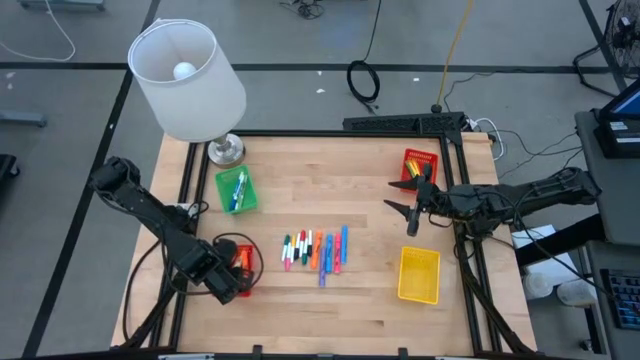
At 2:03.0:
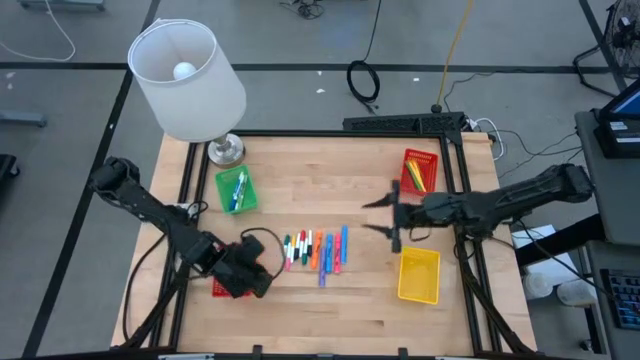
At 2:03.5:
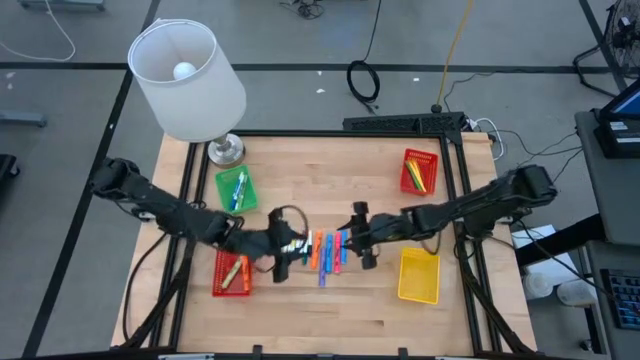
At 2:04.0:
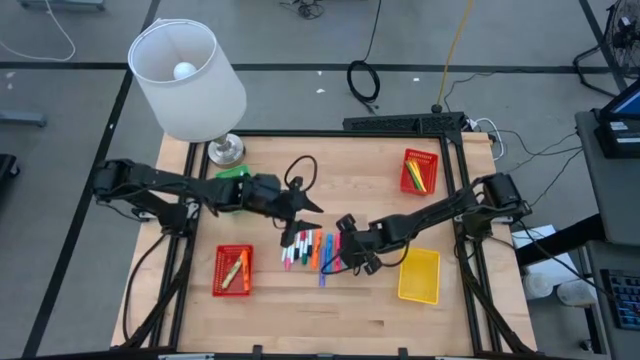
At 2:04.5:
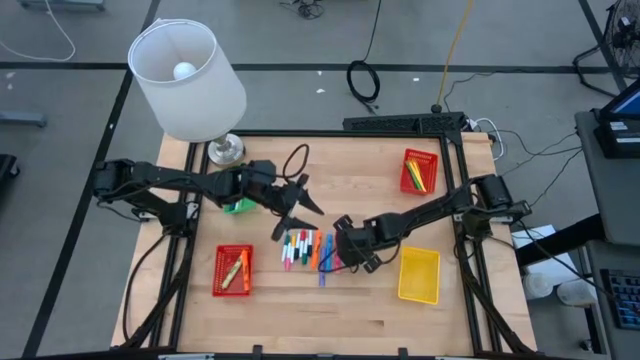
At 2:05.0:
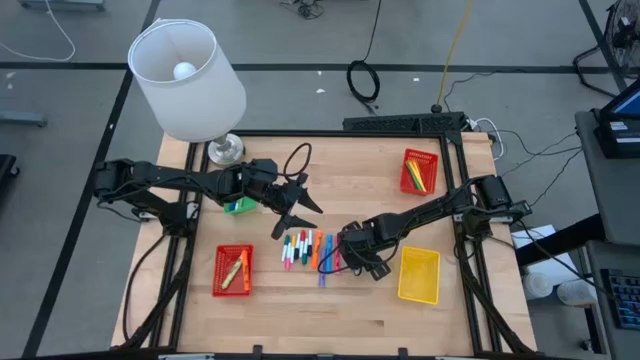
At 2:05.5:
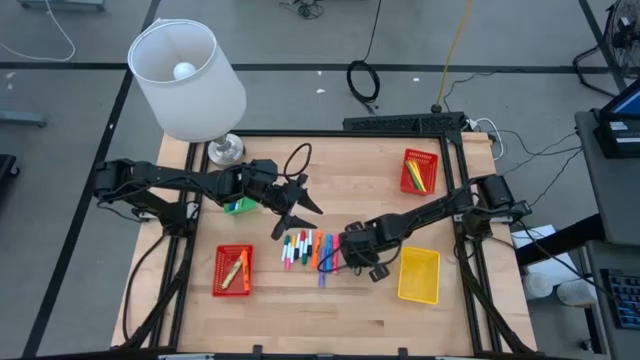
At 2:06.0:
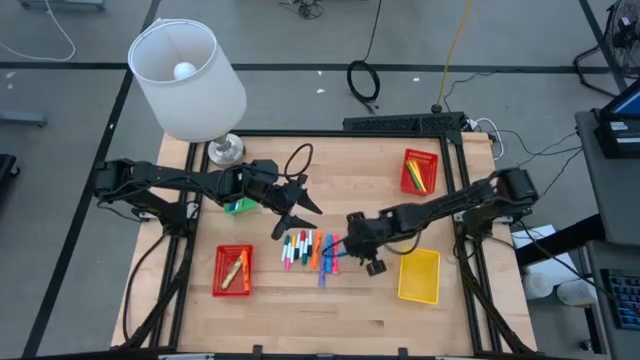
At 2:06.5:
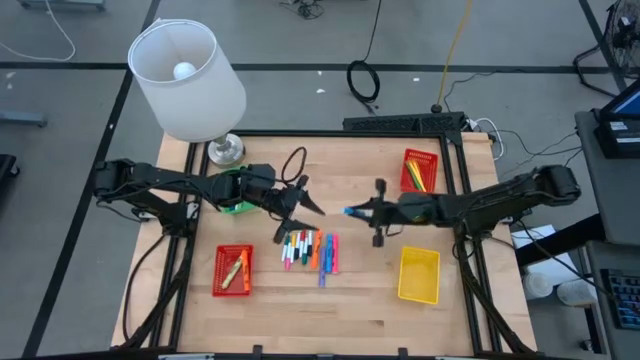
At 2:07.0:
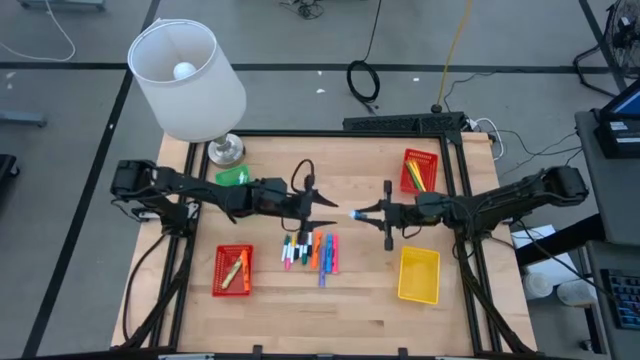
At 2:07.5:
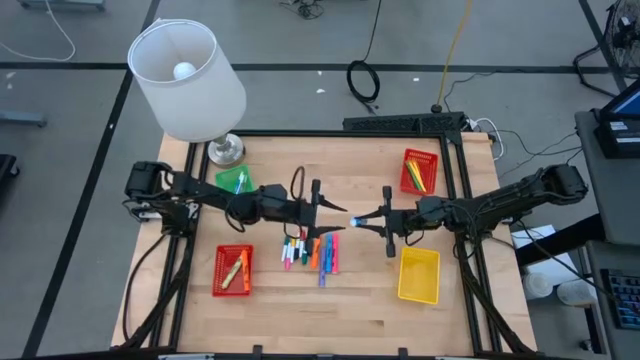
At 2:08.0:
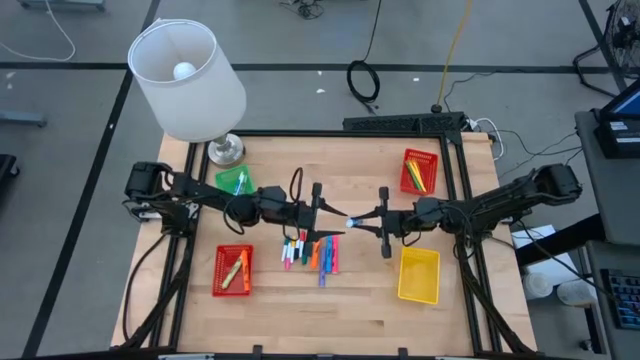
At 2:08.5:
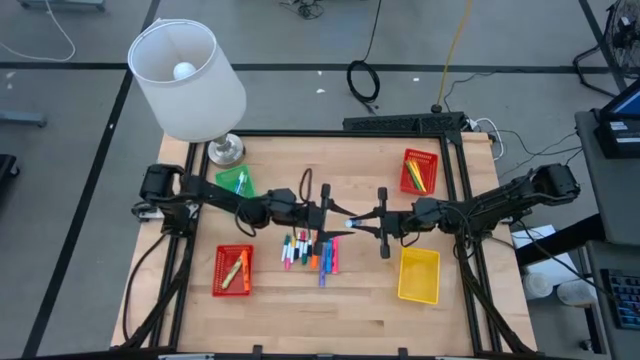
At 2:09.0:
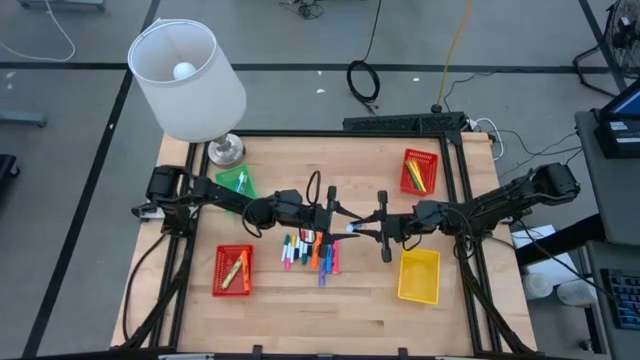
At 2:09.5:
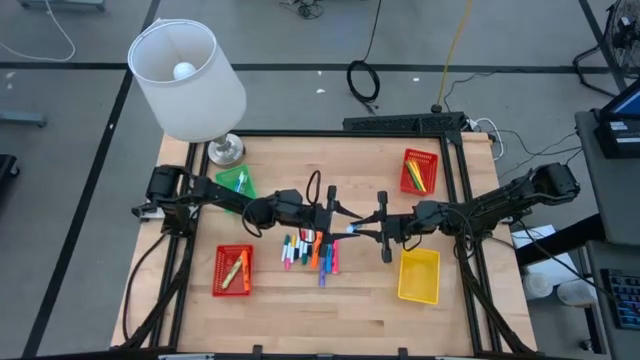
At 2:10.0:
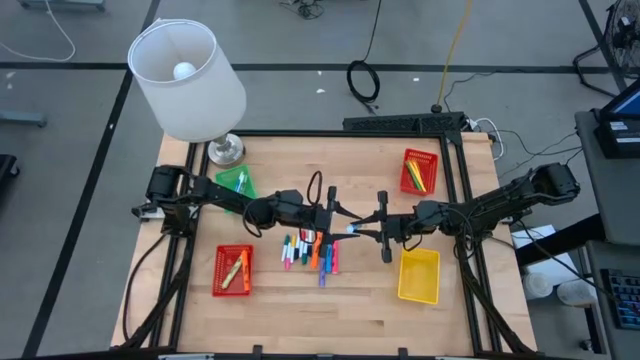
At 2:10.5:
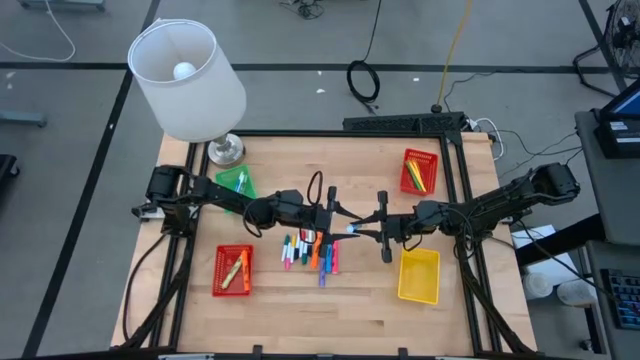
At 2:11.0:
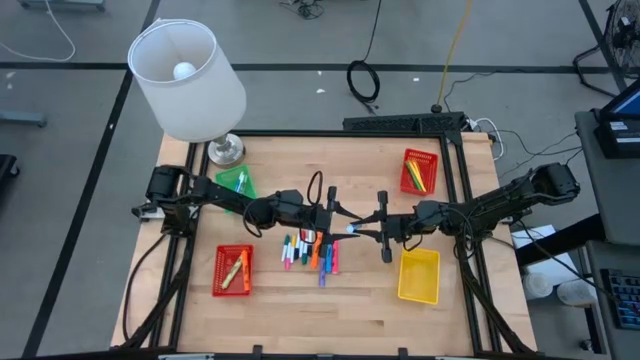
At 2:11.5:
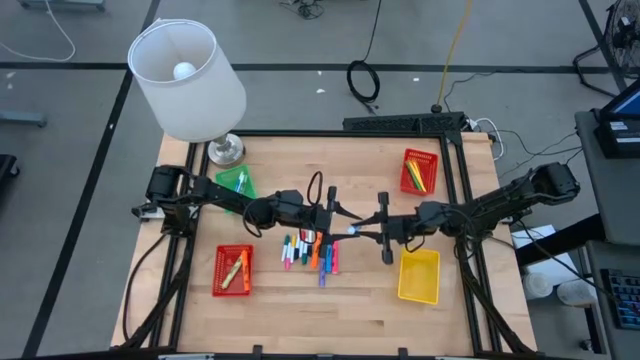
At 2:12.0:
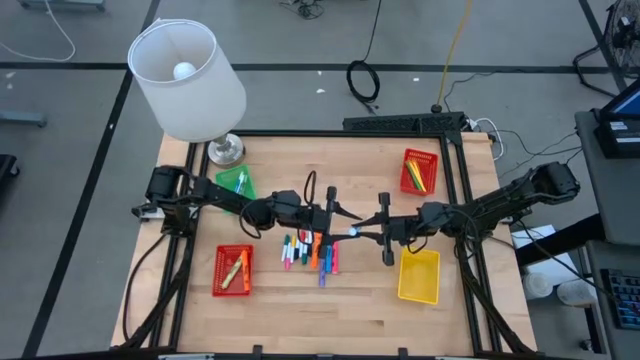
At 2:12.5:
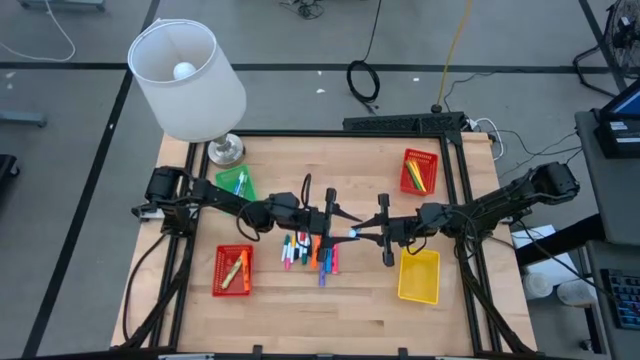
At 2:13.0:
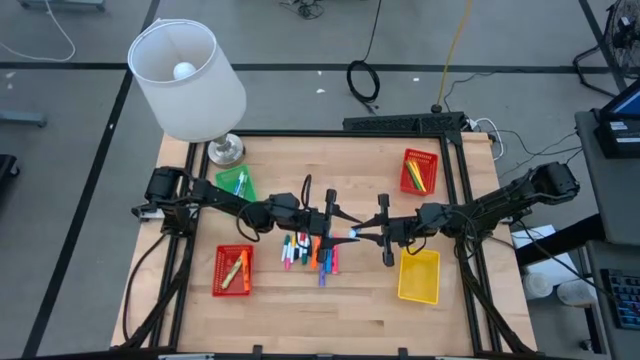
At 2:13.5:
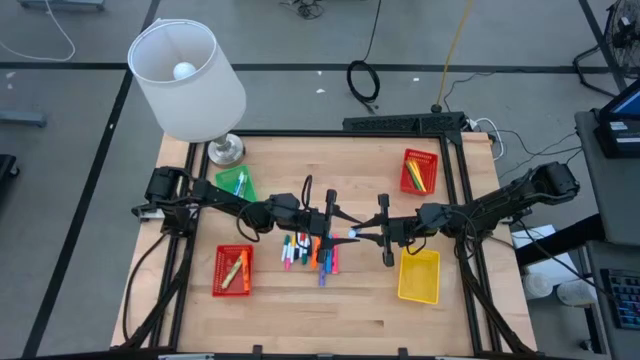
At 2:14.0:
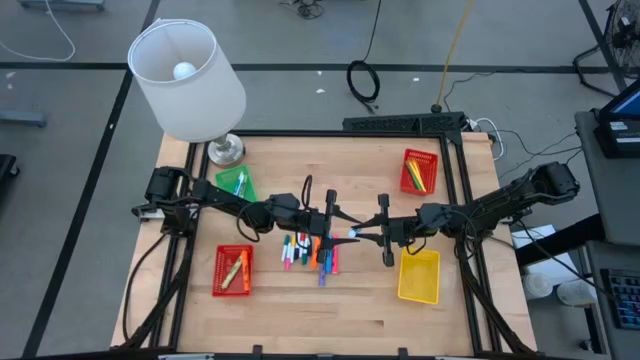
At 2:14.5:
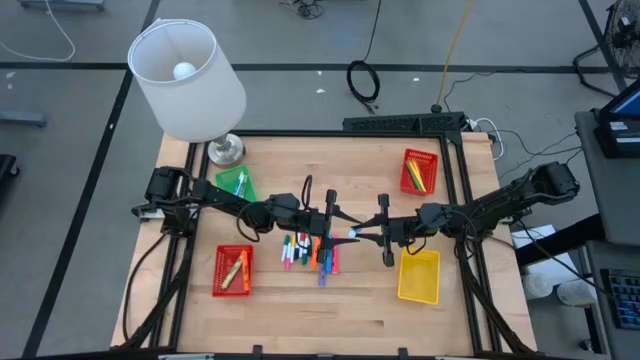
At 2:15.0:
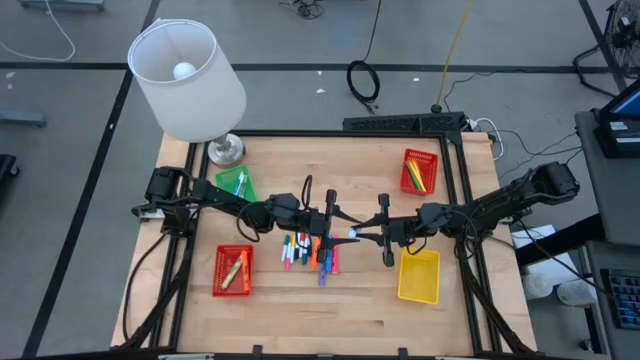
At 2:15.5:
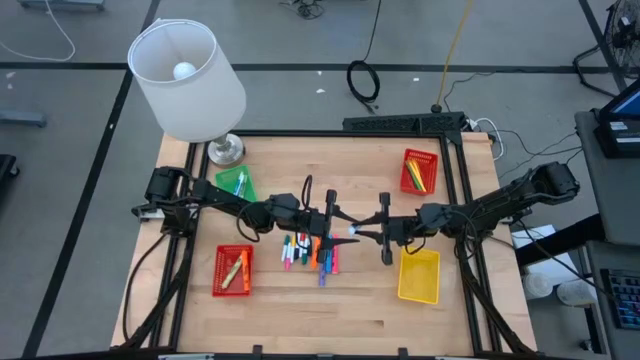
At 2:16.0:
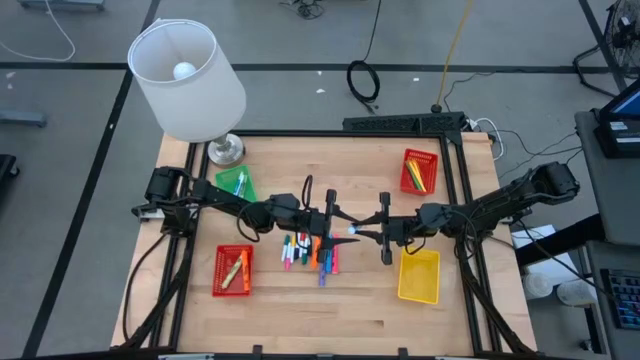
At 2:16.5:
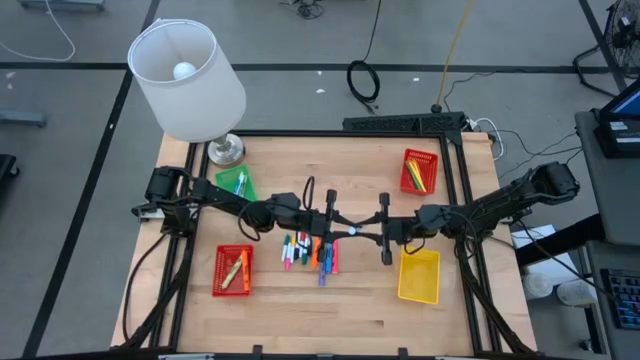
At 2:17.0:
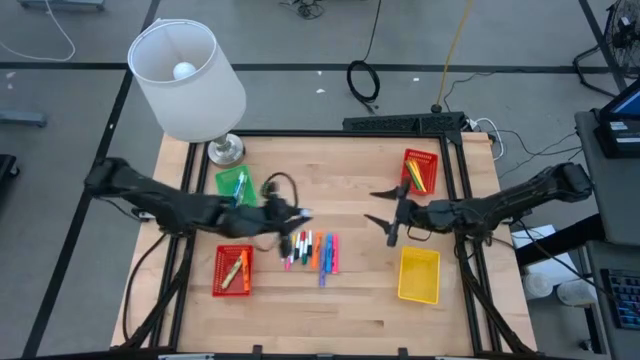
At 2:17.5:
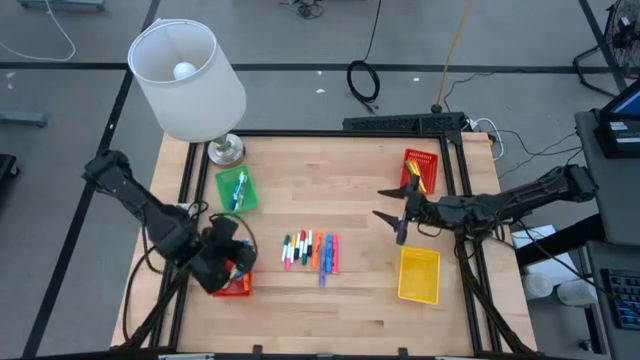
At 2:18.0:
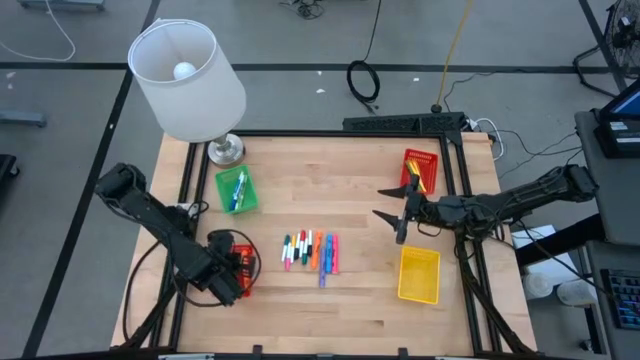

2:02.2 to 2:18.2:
Task: Pick & Place Markers
Put the right blue highlighter pen into the bottom red basket

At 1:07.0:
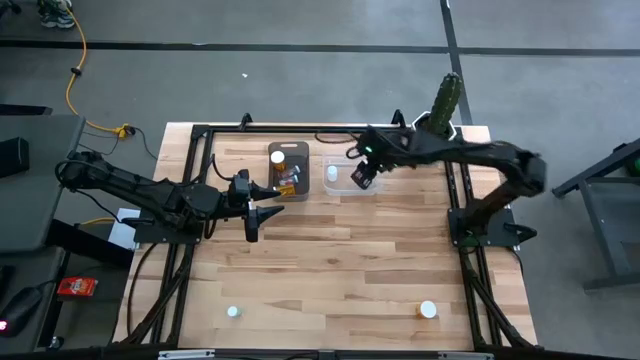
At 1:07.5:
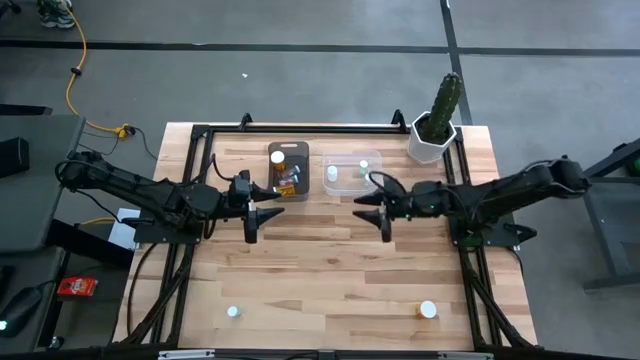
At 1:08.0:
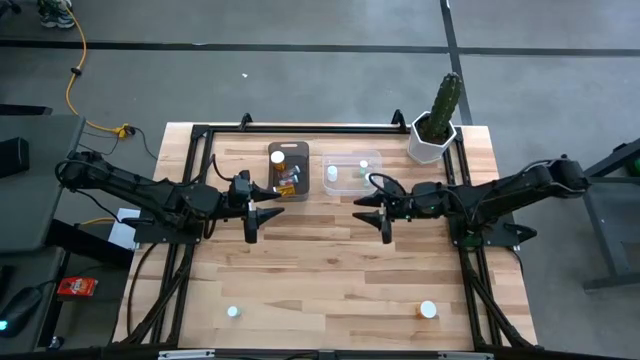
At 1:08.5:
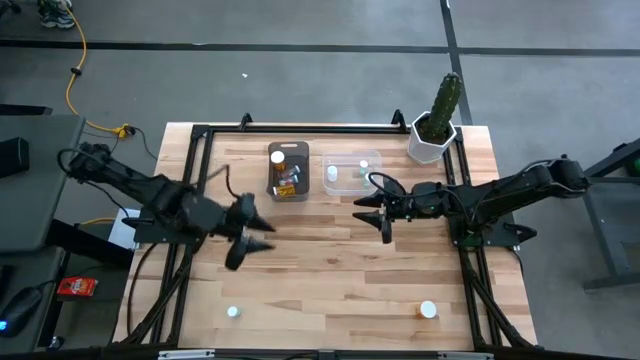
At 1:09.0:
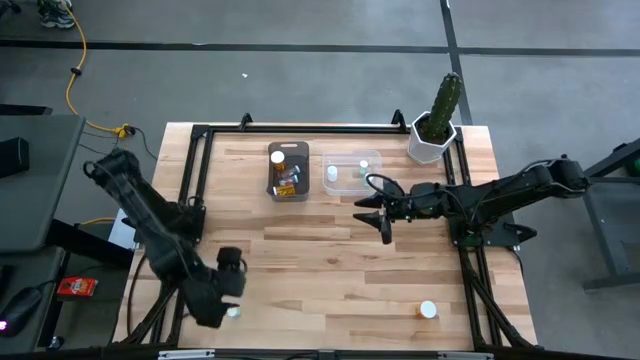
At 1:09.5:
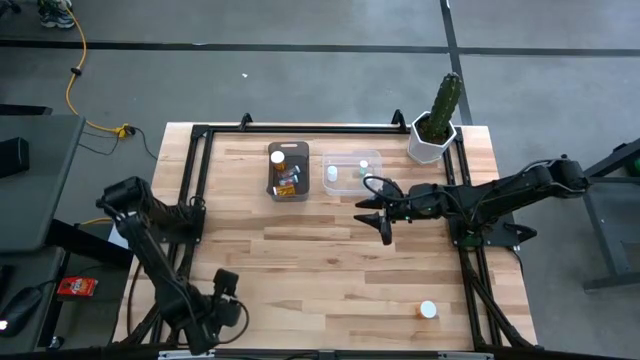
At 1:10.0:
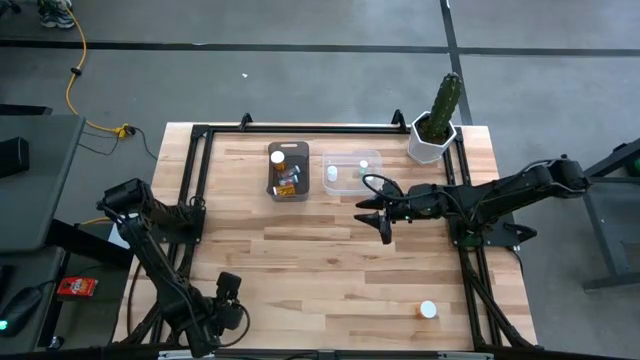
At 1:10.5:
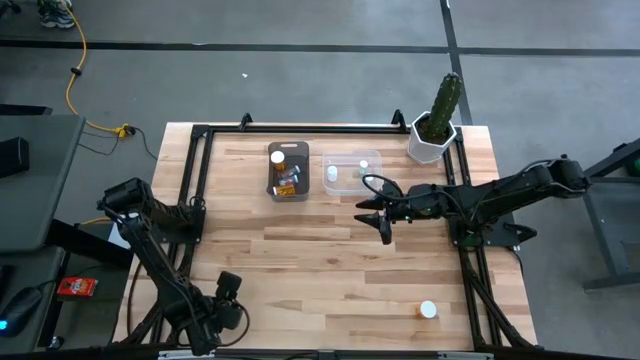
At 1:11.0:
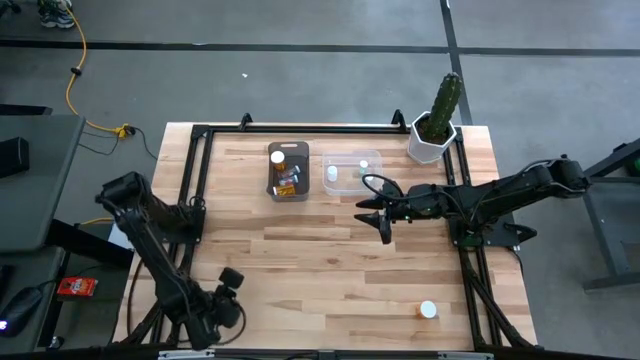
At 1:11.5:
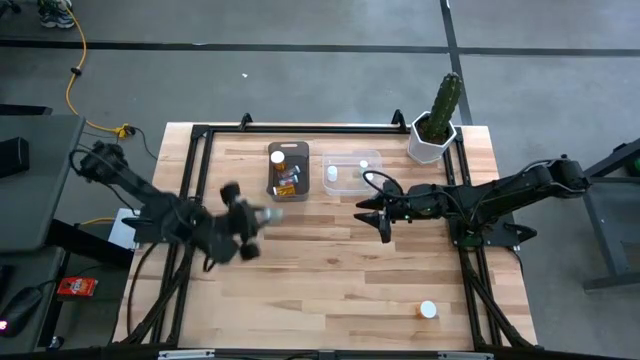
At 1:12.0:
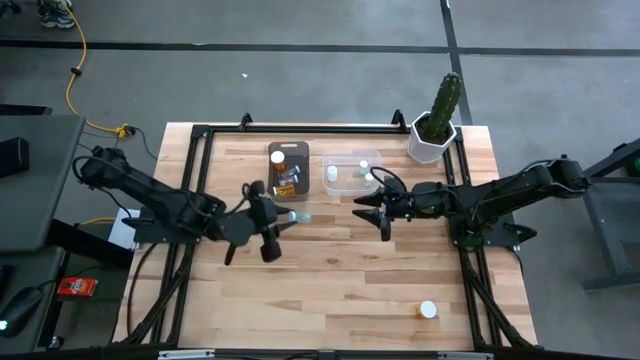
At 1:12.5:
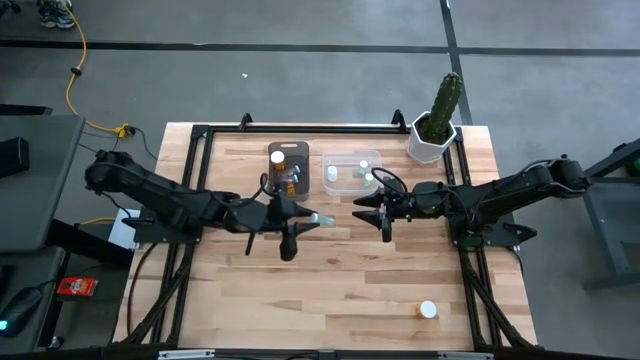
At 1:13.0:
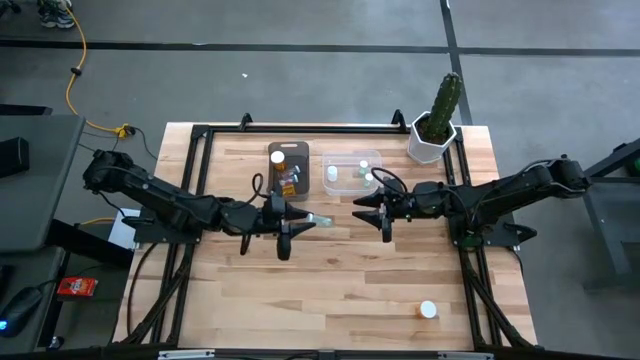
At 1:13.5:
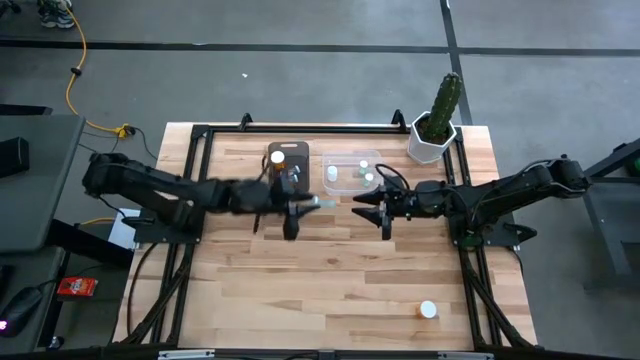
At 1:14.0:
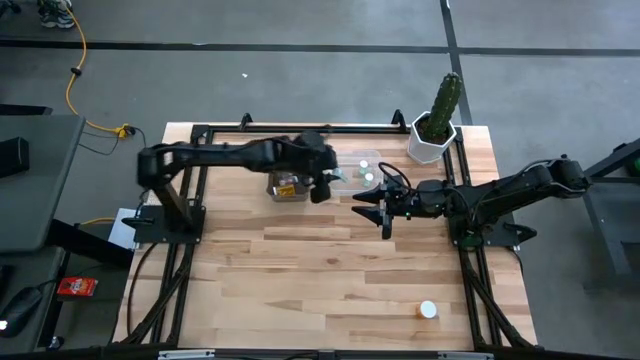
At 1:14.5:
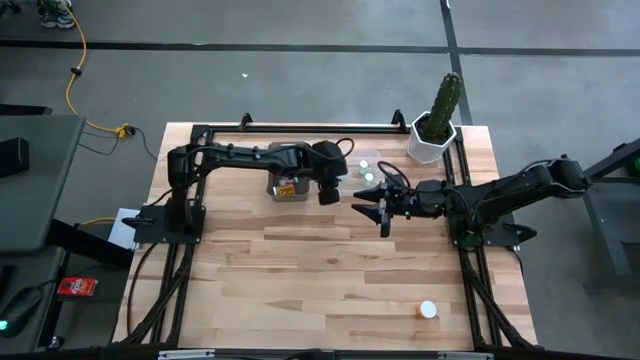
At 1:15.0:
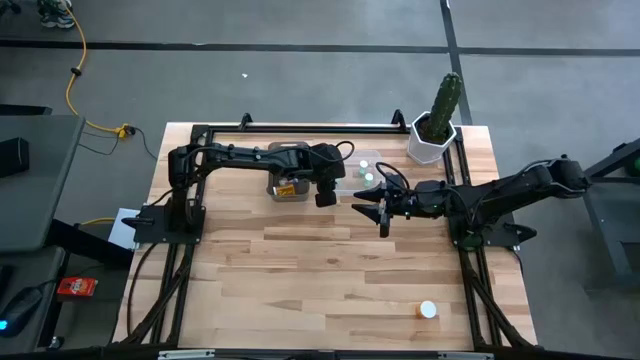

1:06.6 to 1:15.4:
Task: Pick and place medicine bottles into bin by pill shape (circle, oval)
Put the green tablet bottle into the transparent bin
